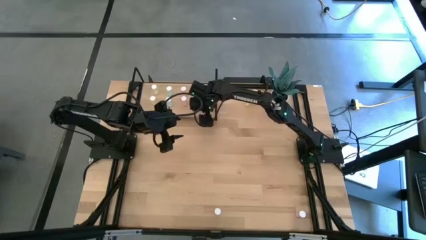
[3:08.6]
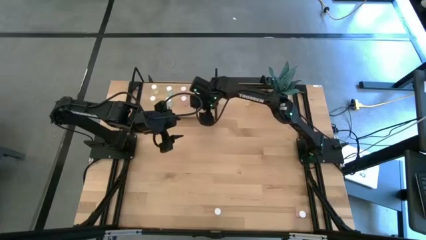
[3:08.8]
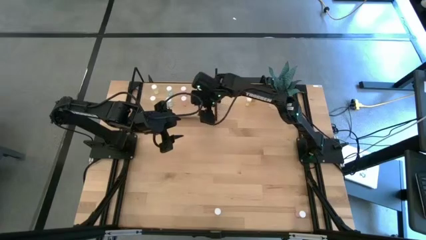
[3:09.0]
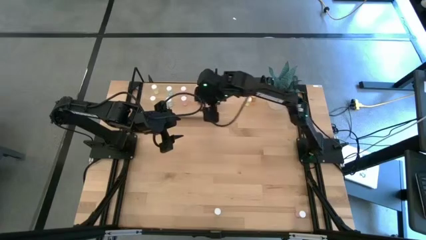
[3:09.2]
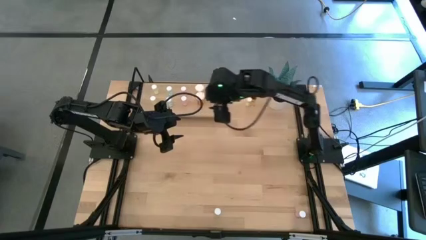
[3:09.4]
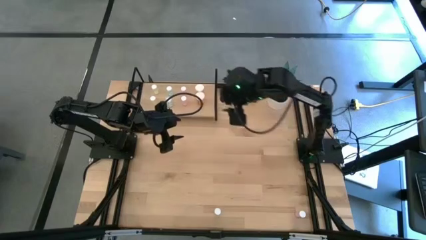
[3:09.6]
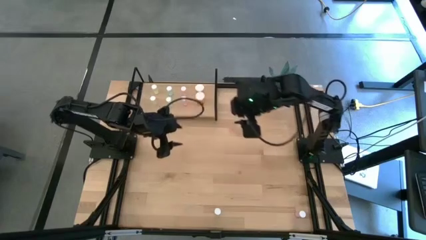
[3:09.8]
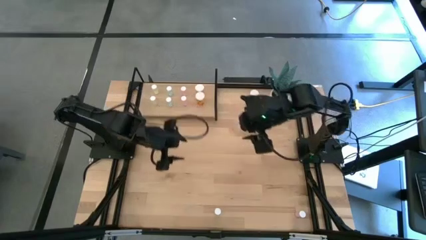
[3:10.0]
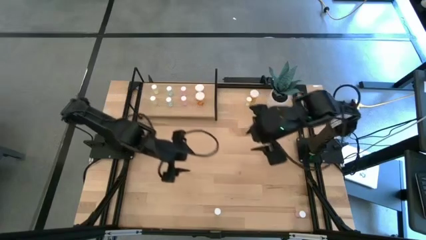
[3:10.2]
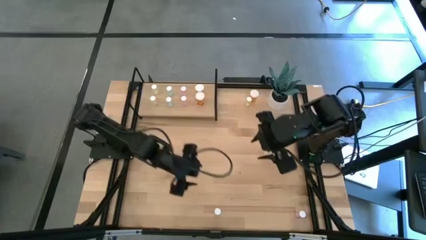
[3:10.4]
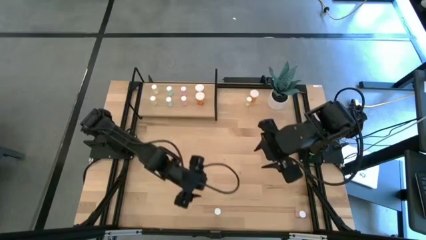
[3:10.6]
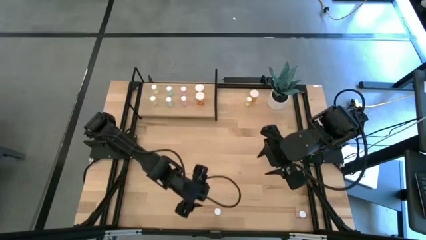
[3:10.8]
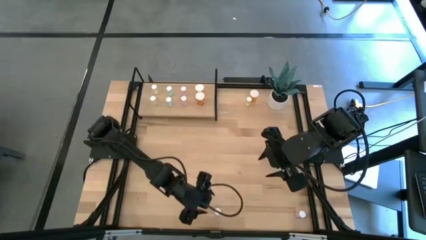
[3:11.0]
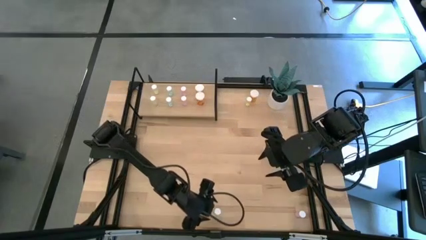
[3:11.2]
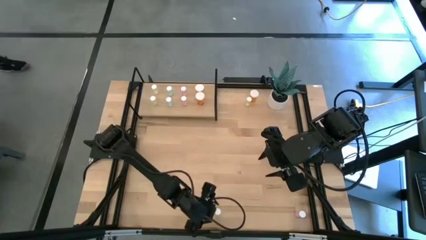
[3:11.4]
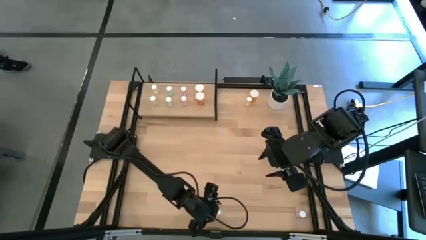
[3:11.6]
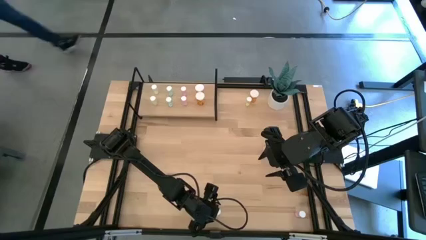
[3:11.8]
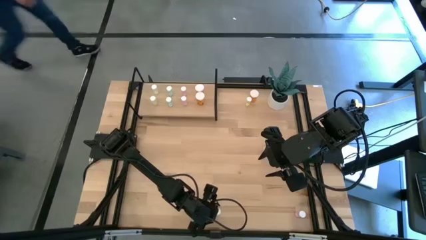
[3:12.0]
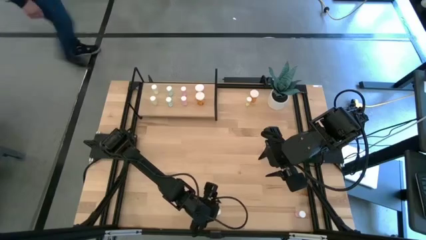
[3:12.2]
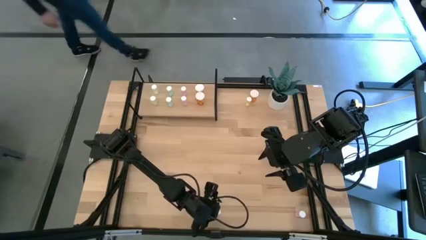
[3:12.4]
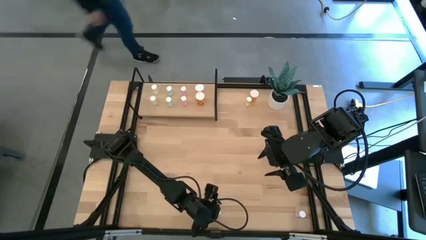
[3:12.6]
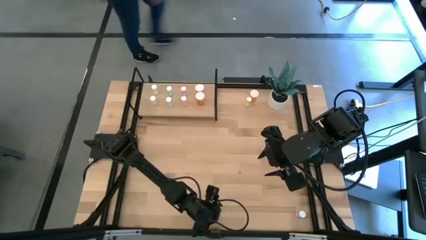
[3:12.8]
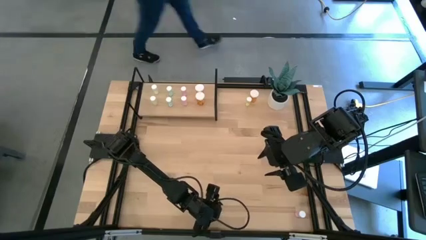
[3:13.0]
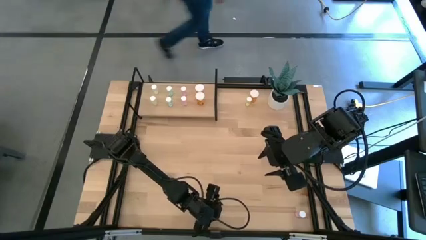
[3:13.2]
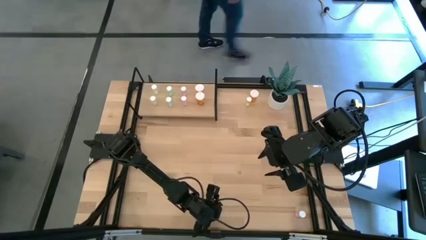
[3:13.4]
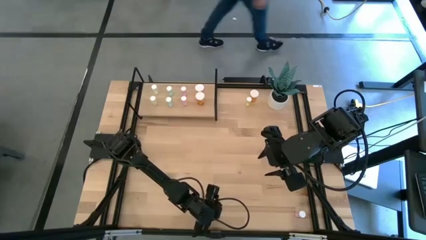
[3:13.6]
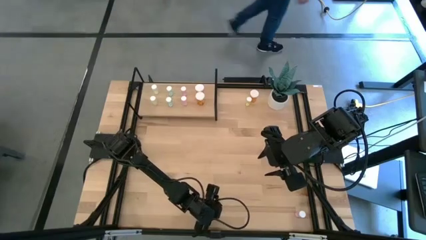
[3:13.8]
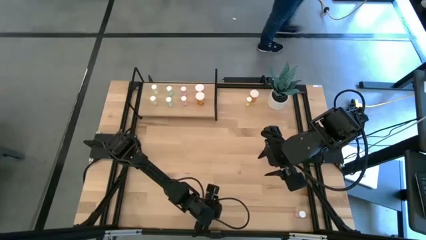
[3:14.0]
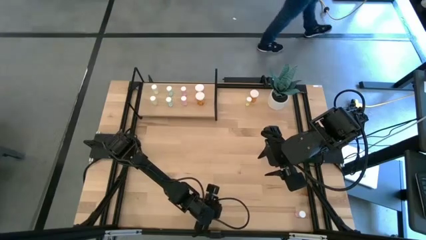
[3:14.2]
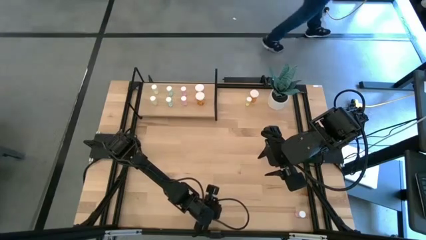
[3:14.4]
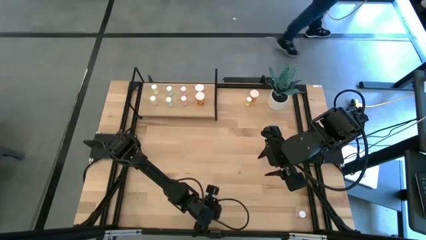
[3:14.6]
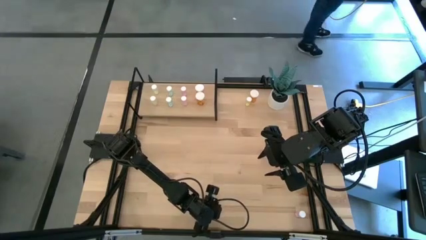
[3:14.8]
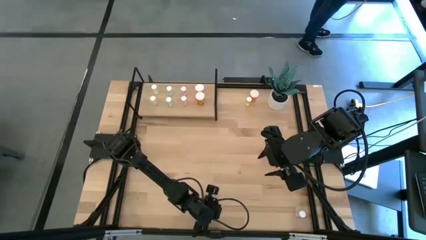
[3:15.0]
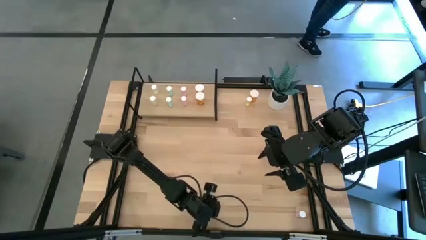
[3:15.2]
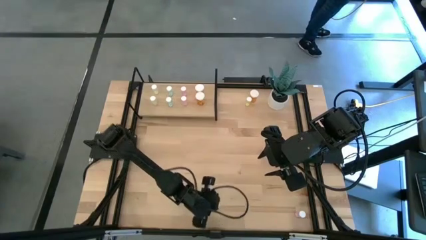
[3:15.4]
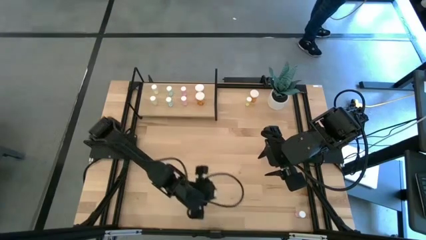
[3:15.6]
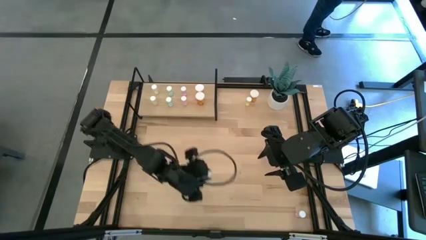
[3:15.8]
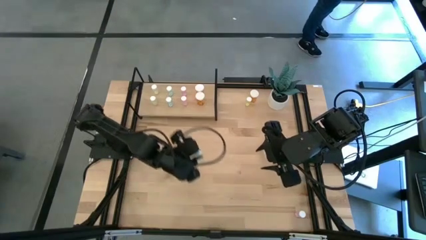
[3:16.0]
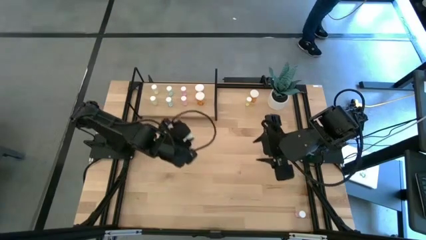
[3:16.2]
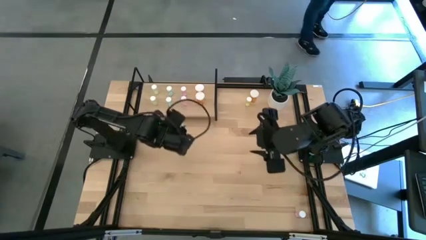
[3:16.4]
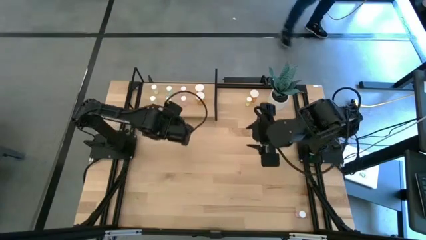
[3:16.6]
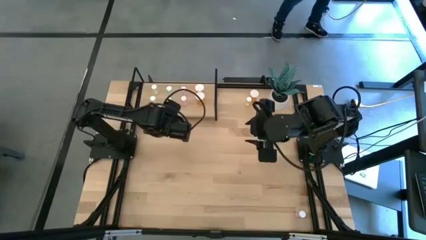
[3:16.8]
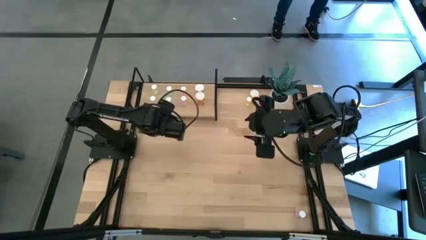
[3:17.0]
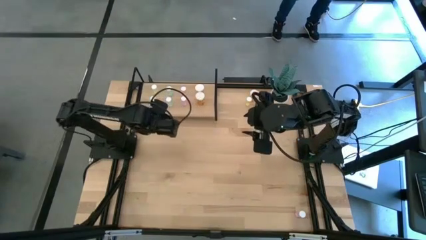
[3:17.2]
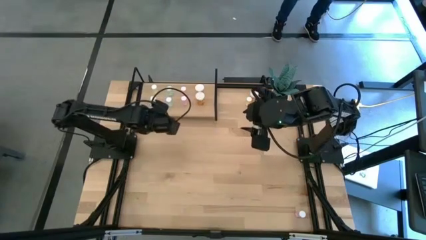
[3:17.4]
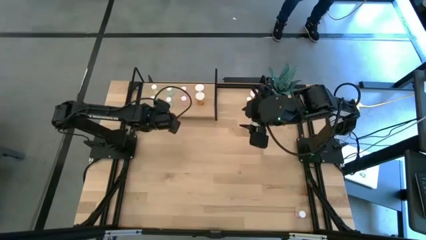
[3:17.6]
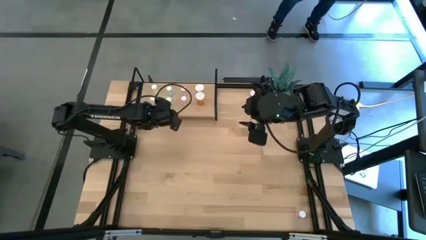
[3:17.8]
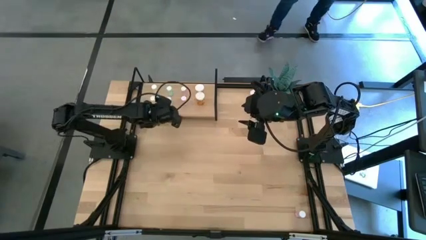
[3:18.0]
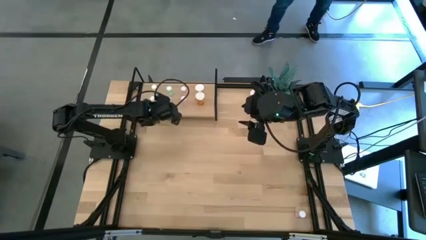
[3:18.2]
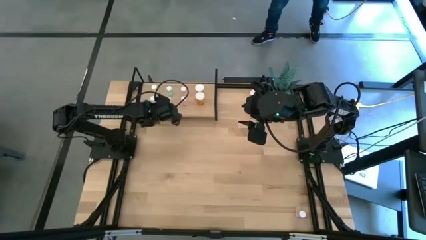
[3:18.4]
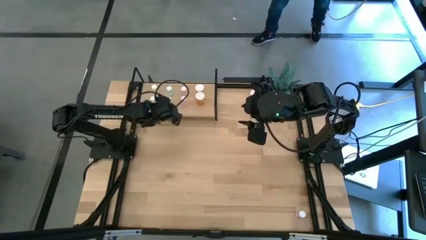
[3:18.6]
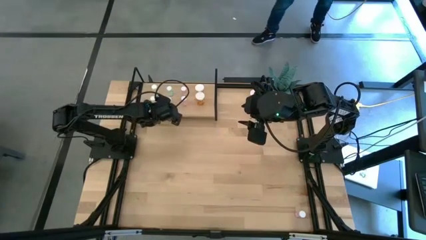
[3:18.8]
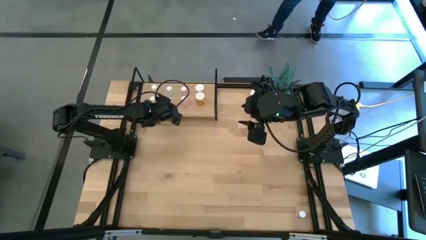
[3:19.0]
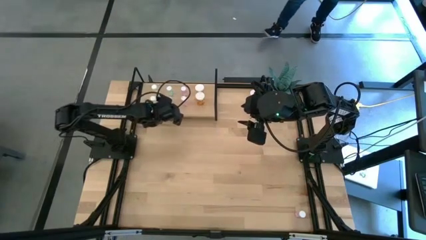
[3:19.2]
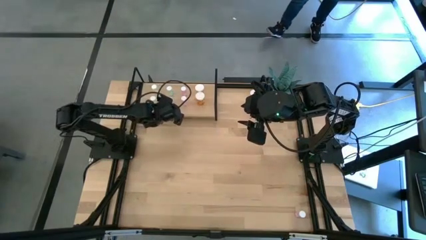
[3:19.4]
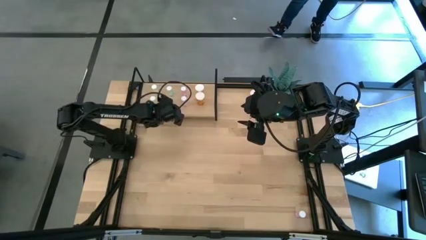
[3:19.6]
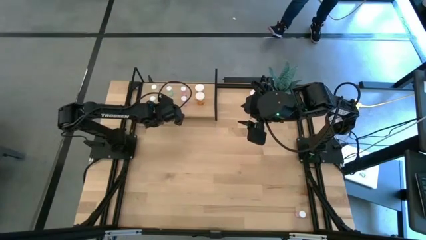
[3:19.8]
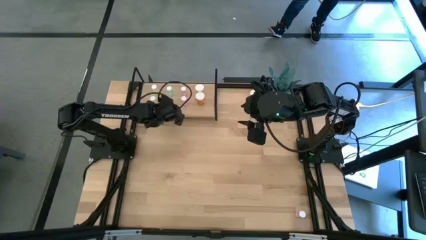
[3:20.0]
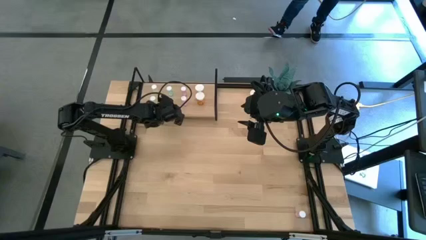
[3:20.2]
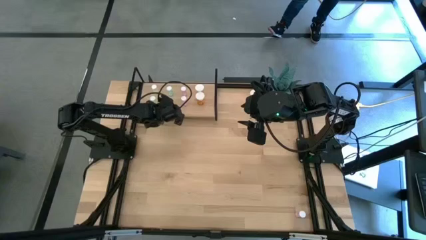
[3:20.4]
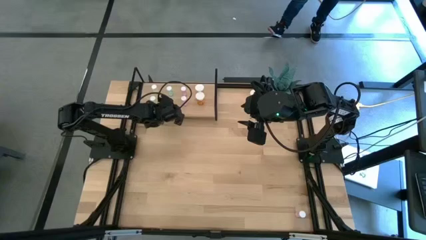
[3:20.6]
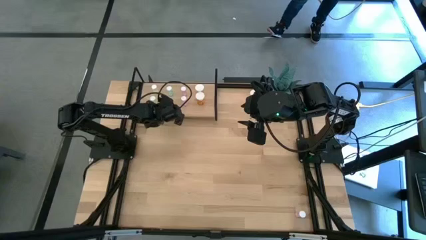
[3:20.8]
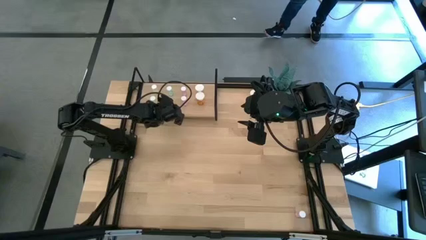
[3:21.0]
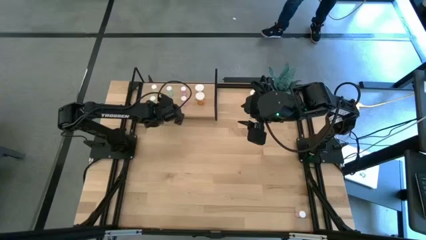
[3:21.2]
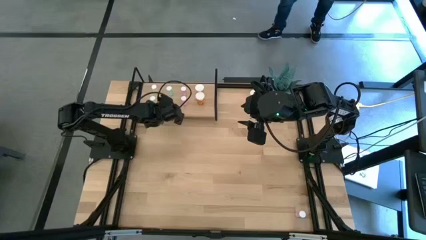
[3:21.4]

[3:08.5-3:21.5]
Task: Pick and place medicine bottles onto shelf by color
Put the green pill bottle on the shelf and align it with the other green pill bottles

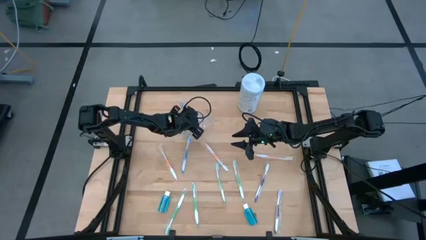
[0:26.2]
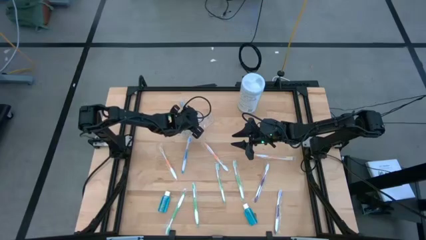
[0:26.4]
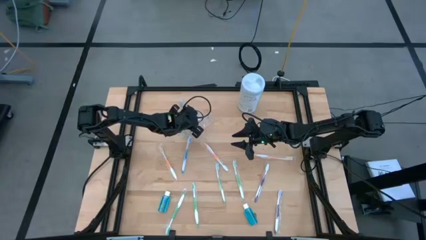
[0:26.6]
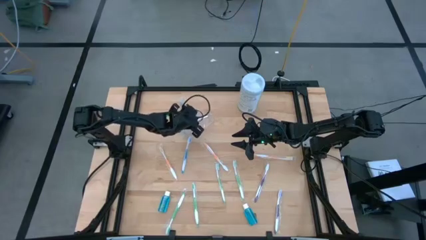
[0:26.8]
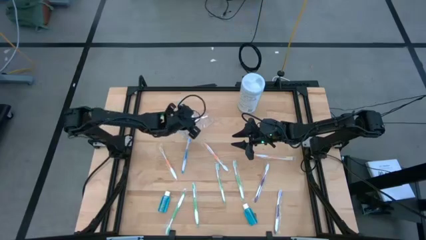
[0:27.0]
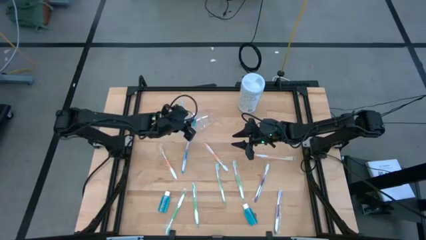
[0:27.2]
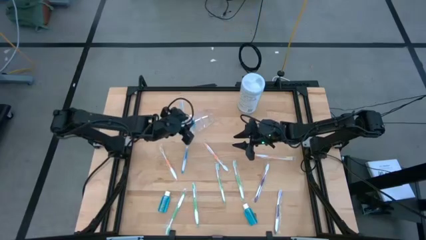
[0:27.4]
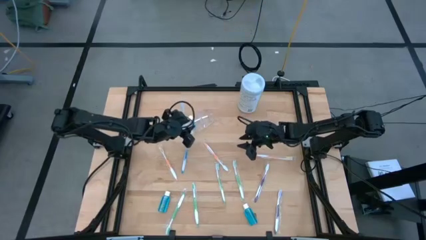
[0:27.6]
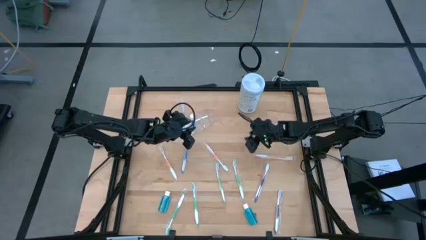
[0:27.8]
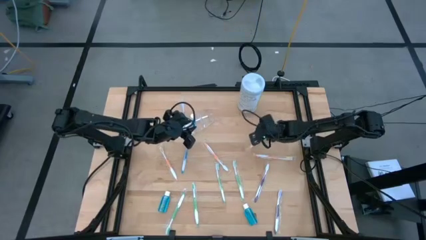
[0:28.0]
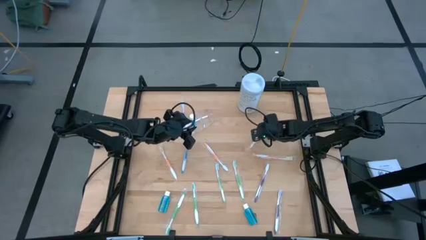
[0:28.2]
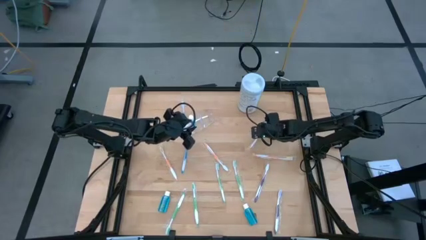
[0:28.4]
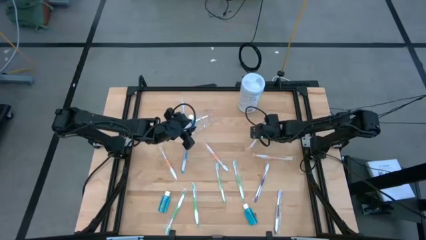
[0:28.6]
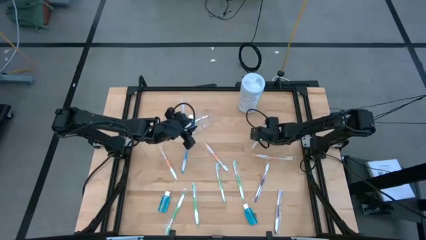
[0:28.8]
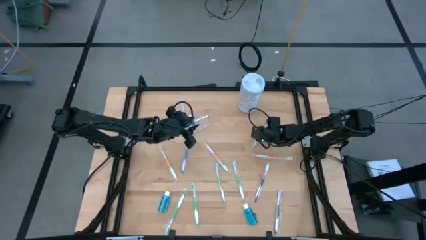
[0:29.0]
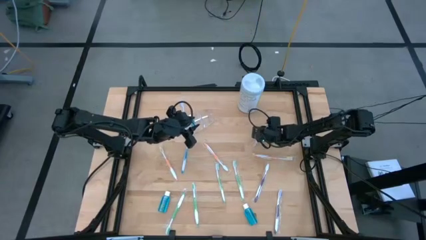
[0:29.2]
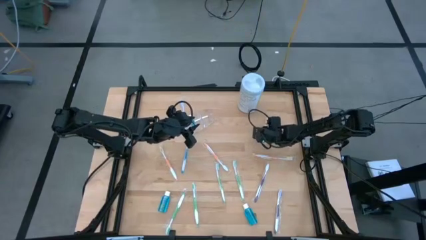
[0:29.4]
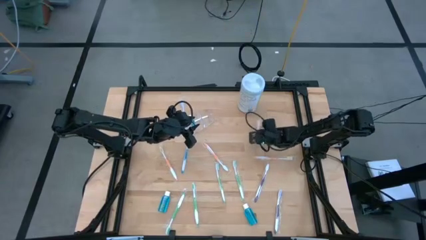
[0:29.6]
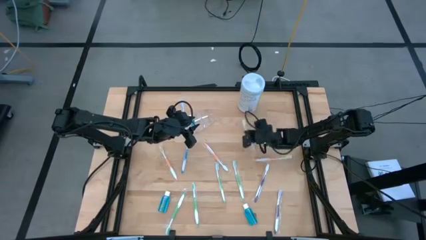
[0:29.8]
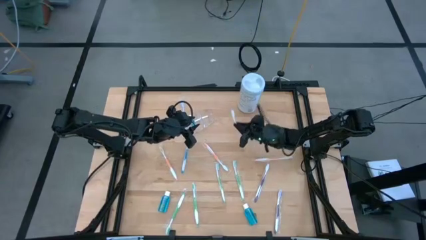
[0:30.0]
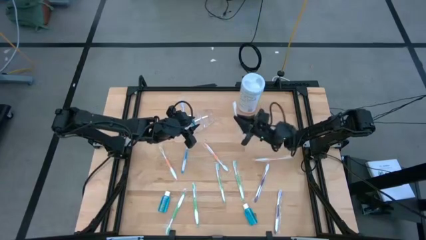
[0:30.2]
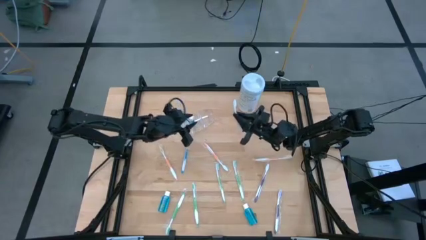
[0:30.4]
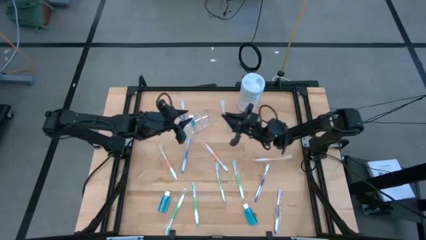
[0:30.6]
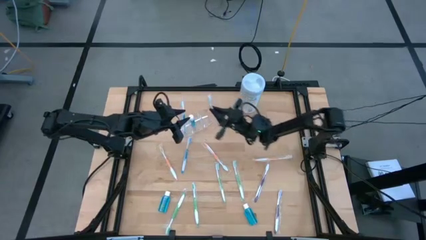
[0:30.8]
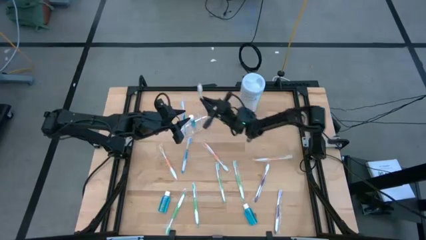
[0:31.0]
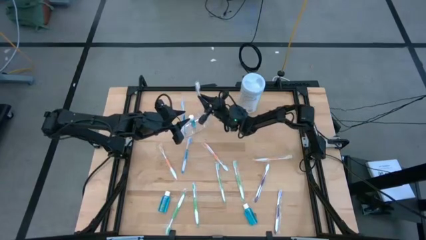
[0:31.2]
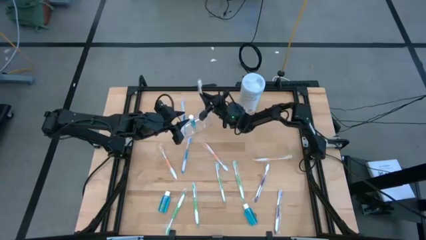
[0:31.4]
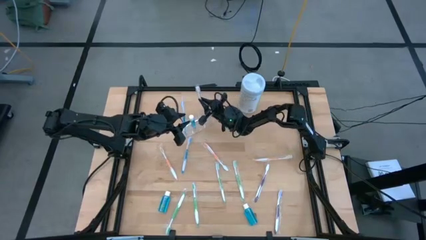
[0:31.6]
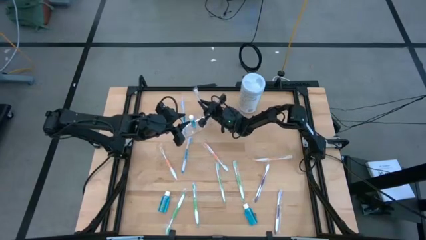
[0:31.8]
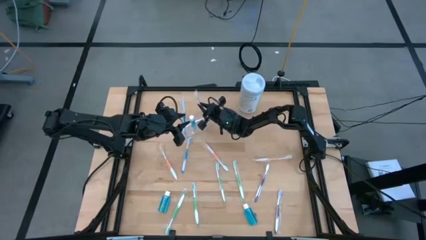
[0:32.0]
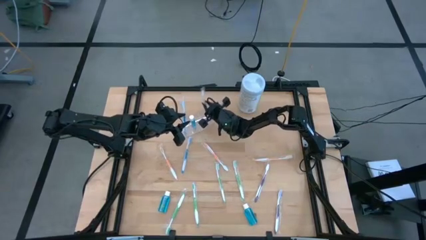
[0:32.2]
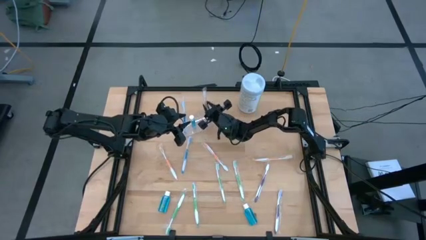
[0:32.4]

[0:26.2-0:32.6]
Task: Pick & Place toothbrushing station
Put the orange toothbrush into the transparent organizer
